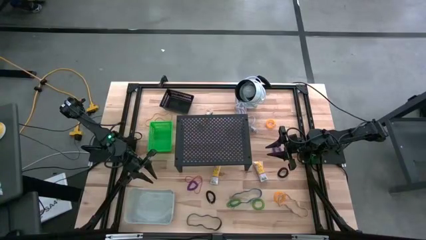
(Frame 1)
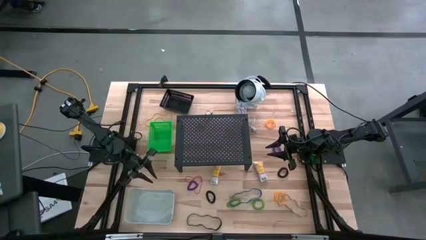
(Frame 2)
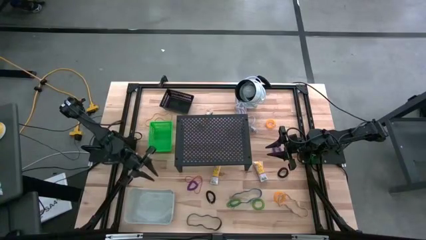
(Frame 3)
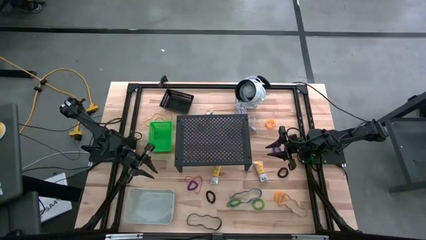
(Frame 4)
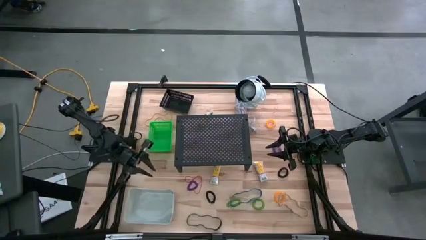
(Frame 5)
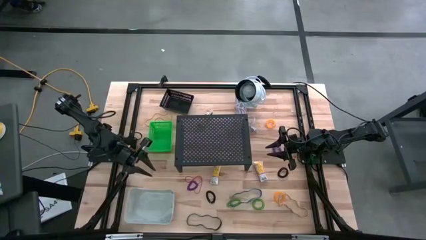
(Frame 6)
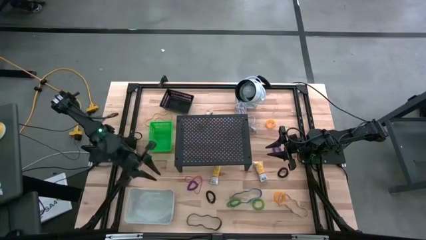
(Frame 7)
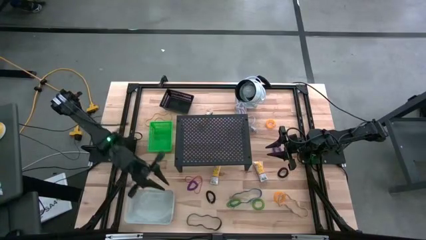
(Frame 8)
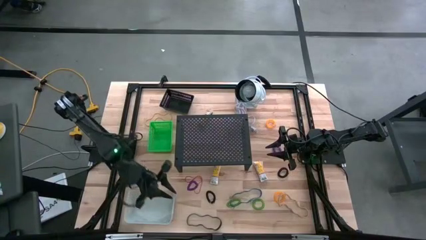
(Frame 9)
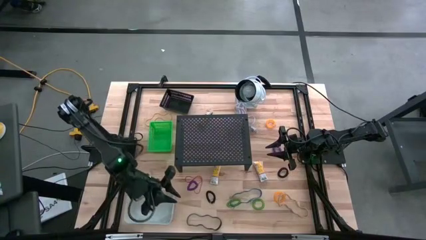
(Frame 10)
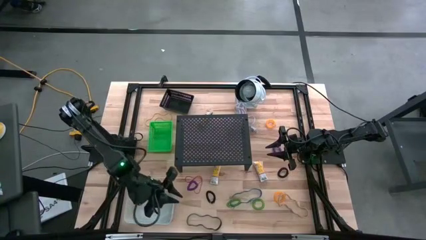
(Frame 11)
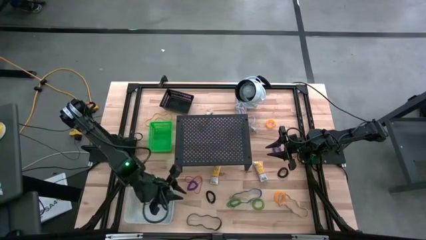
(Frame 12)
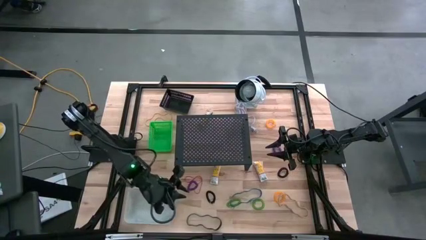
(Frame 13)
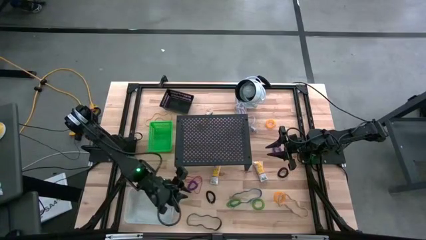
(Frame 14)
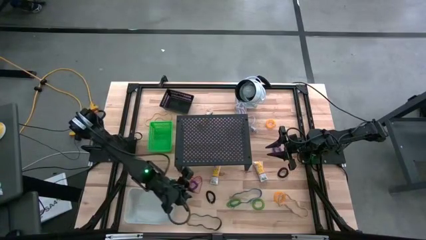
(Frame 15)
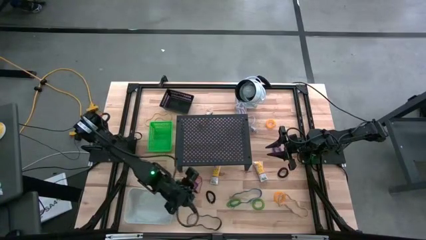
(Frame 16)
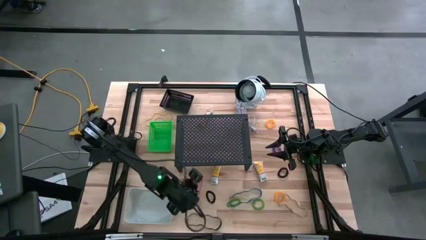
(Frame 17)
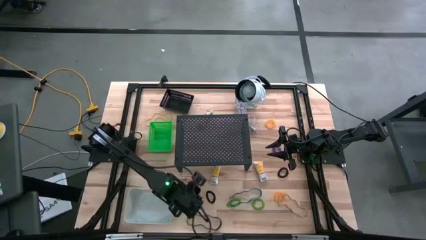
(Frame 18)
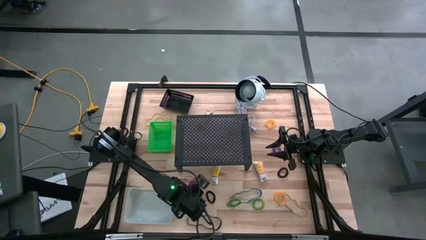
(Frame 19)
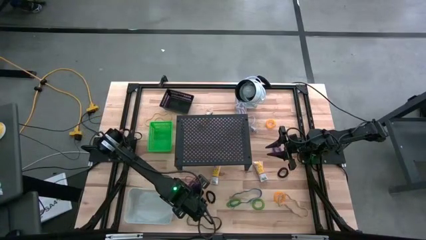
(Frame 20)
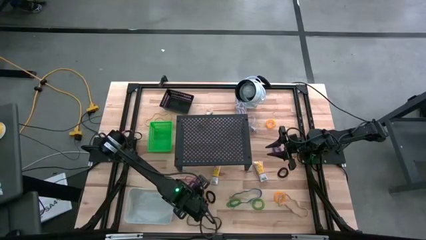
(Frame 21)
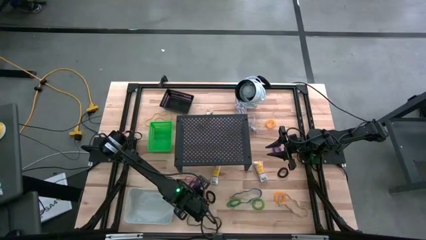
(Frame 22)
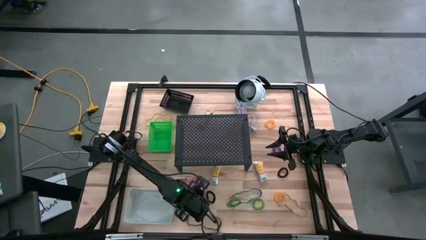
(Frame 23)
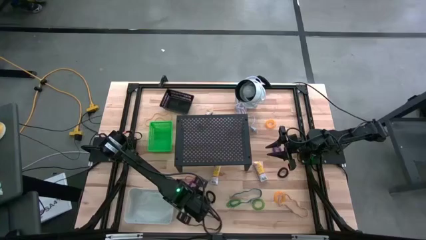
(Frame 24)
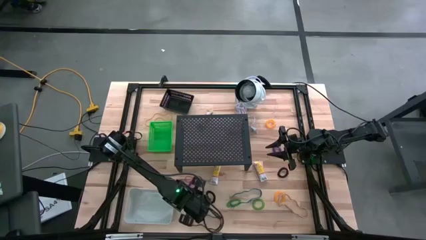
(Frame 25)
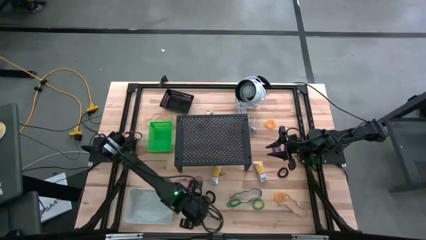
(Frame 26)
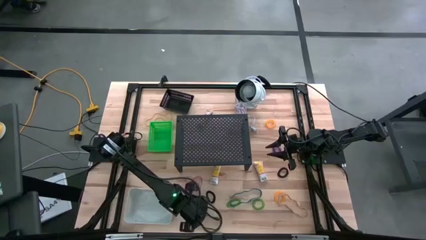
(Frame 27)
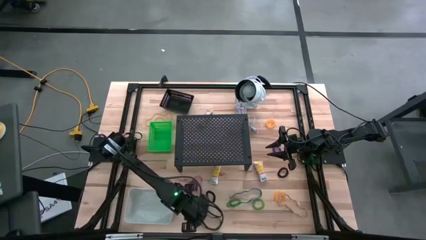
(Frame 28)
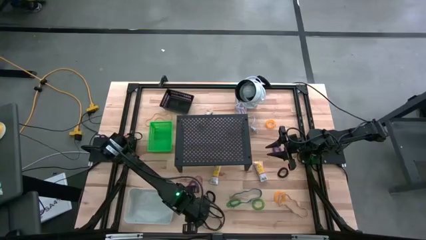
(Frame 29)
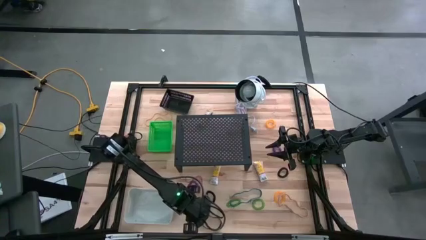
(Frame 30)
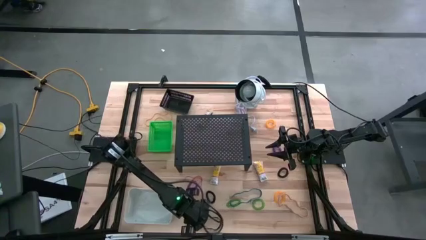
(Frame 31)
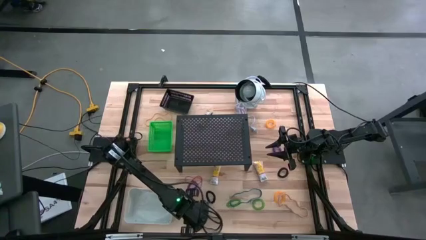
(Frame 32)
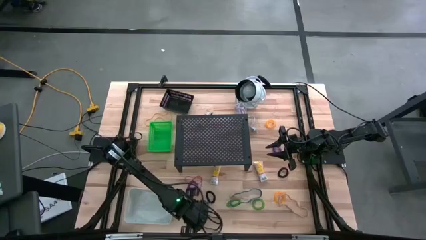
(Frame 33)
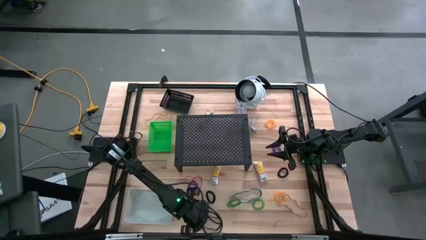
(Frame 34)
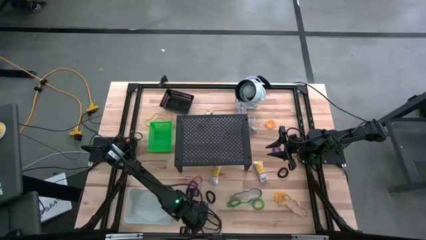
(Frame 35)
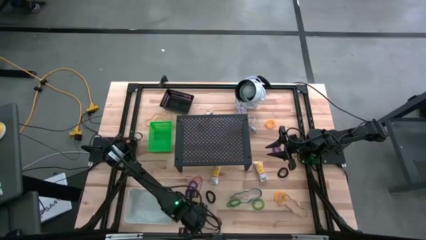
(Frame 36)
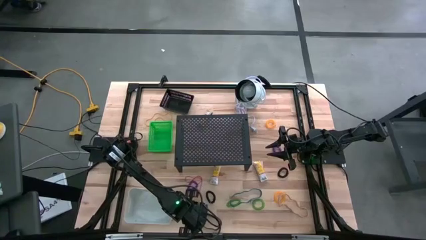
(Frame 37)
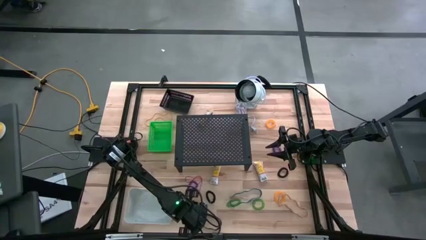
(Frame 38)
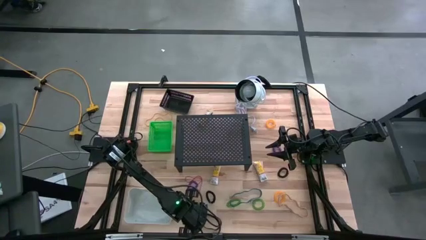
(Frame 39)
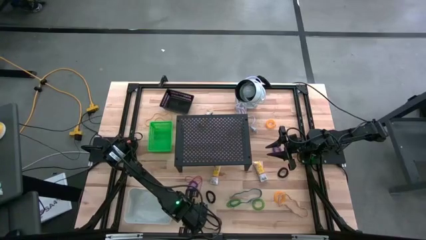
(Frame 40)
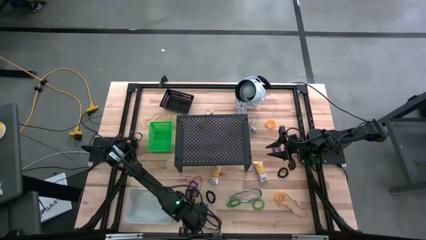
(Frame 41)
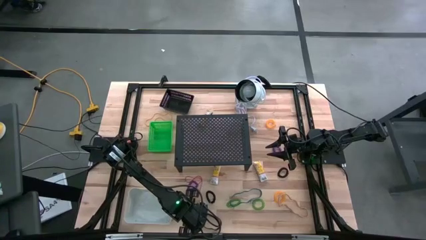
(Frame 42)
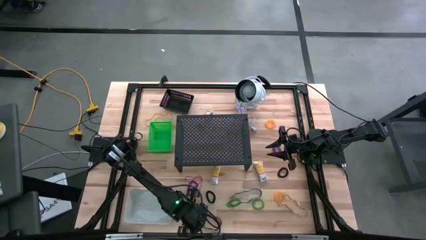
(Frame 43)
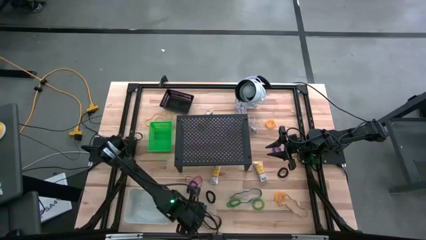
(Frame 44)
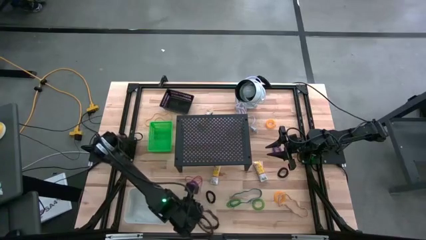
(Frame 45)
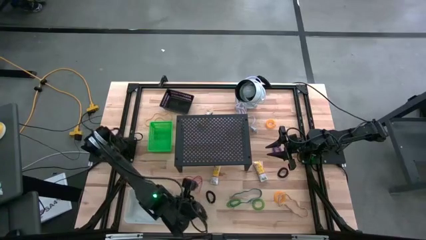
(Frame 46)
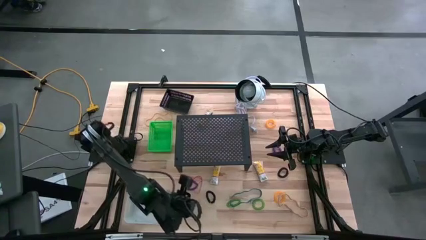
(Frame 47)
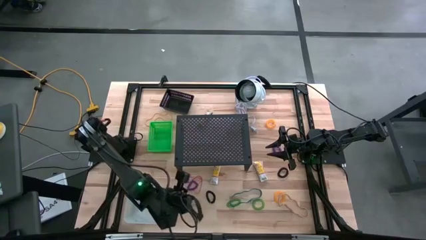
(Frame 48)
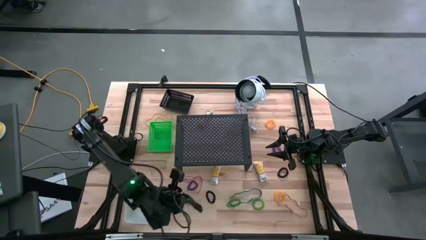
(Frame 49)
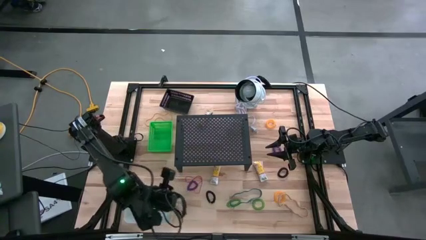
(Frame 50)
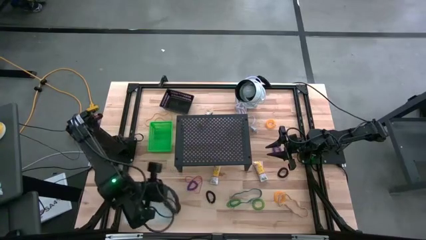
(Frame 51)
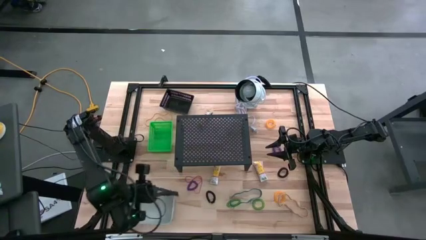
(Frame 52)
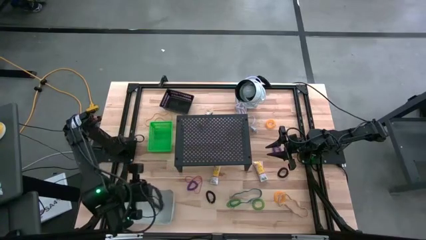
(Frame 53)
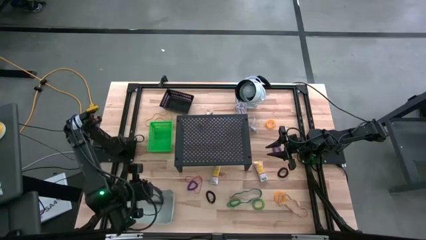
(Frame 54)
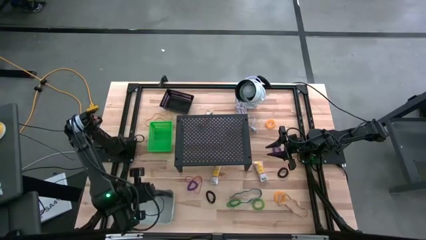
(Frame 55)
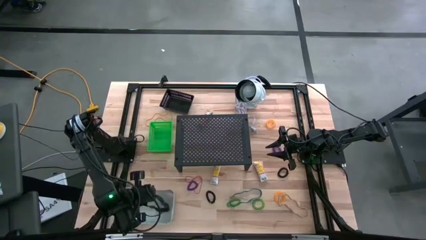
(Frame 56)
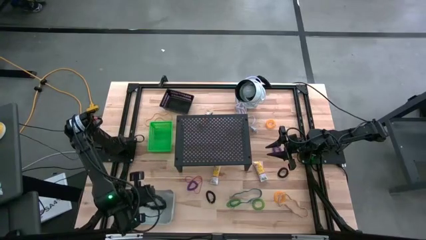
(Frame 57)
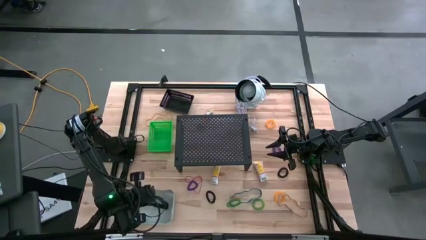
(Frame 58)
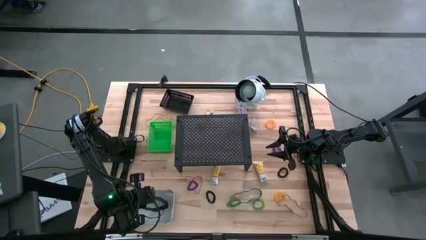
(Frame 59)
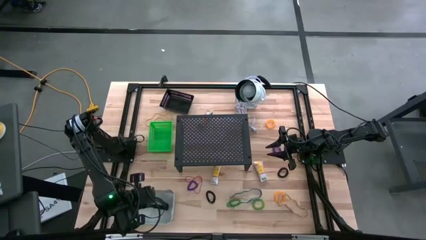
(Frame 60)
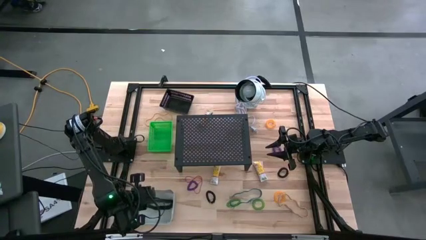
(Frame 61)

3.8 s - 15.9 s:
Task: Pick & Place Office Desk Supplies
Put the black rubber band into the white bin

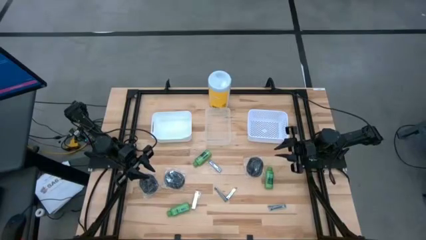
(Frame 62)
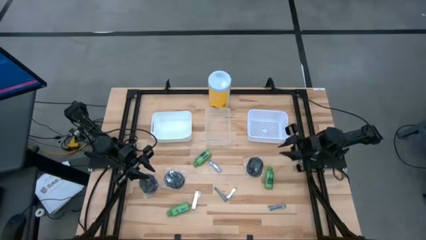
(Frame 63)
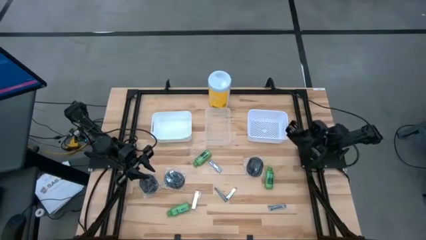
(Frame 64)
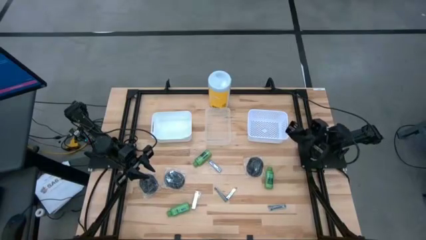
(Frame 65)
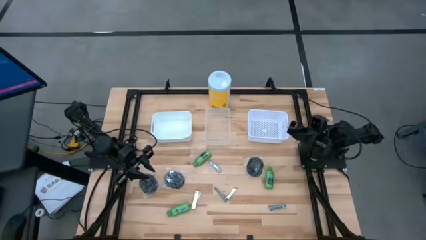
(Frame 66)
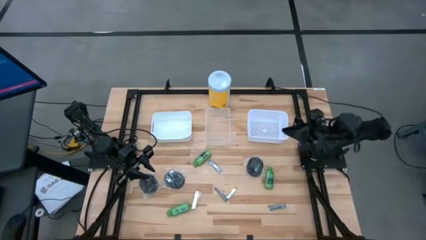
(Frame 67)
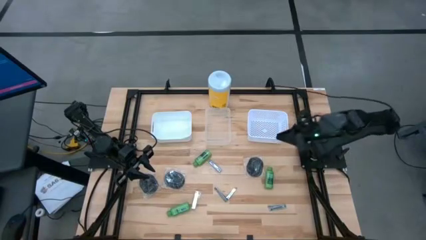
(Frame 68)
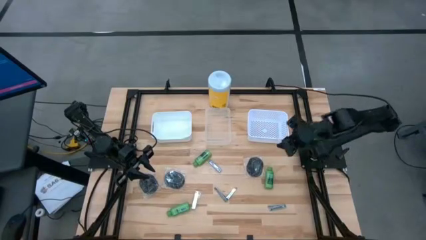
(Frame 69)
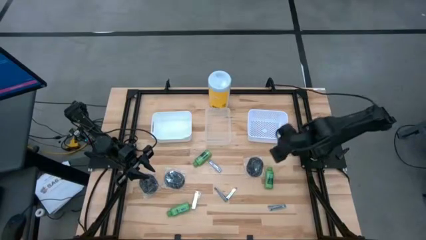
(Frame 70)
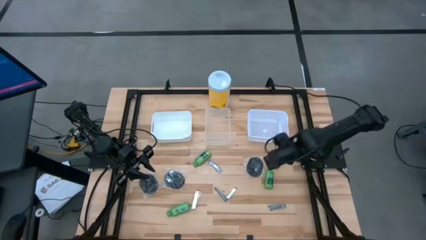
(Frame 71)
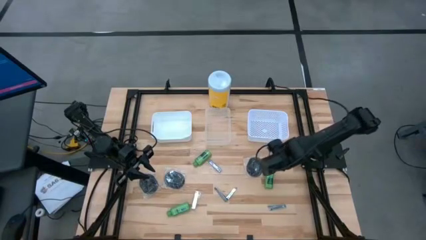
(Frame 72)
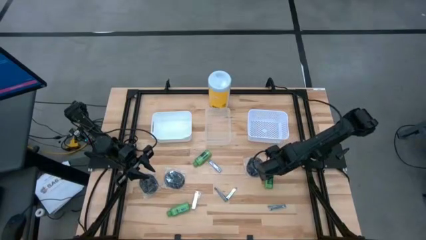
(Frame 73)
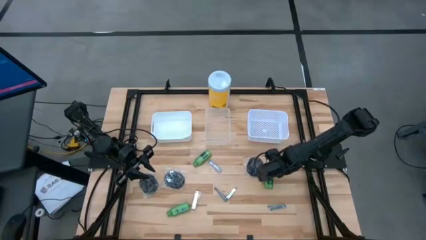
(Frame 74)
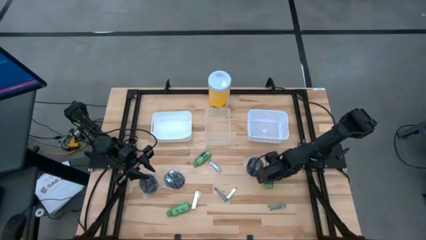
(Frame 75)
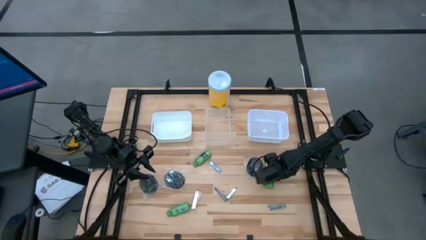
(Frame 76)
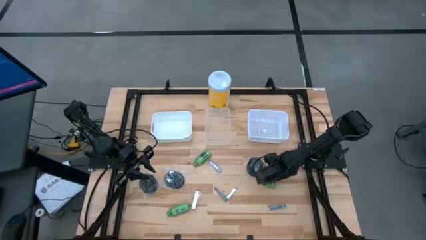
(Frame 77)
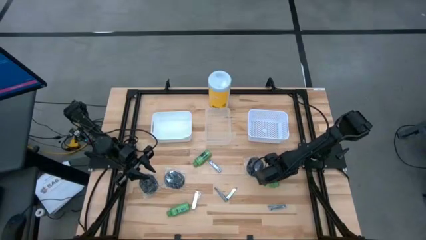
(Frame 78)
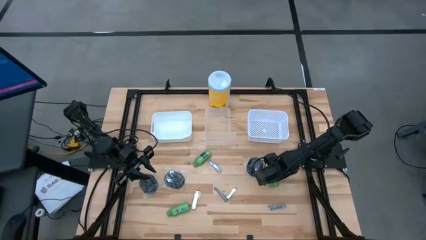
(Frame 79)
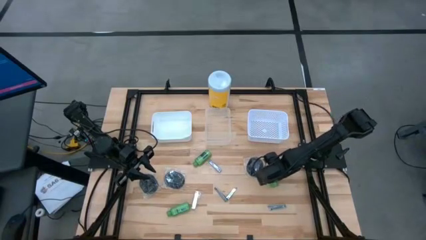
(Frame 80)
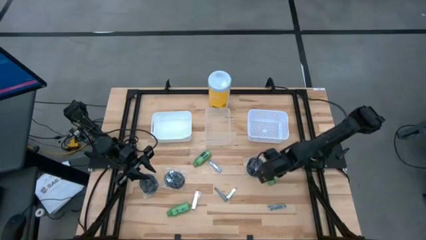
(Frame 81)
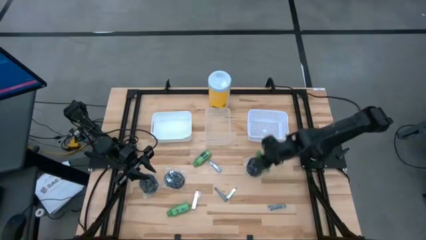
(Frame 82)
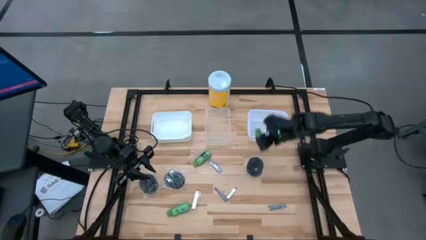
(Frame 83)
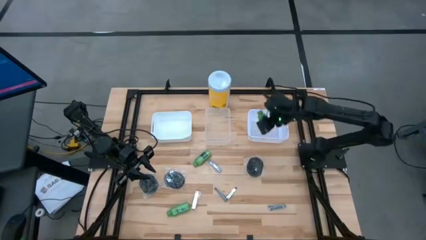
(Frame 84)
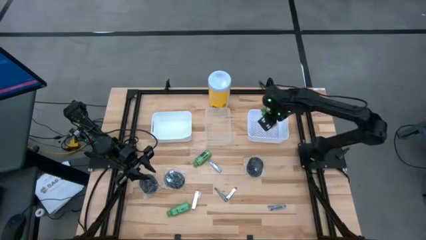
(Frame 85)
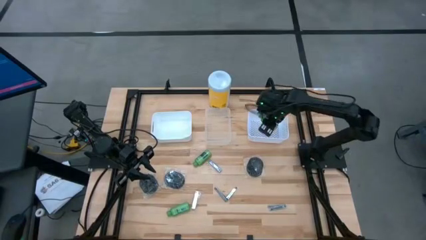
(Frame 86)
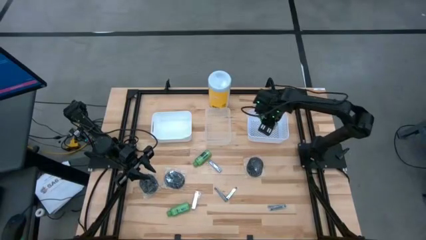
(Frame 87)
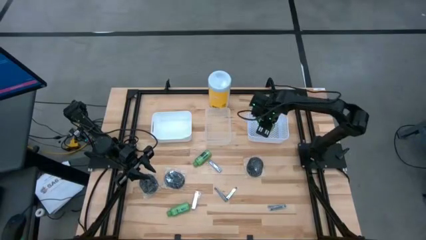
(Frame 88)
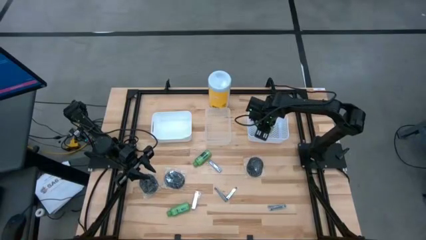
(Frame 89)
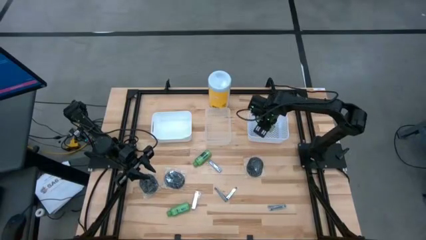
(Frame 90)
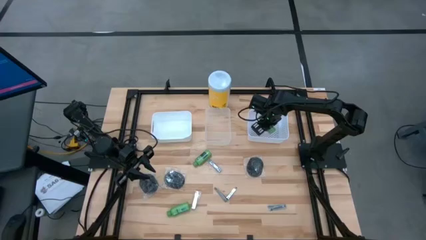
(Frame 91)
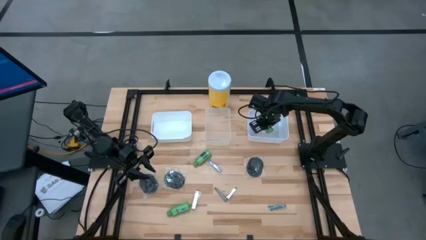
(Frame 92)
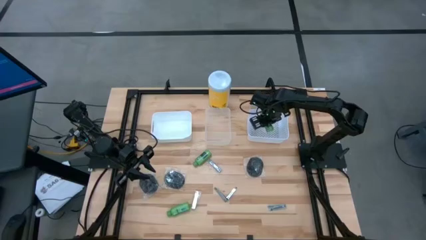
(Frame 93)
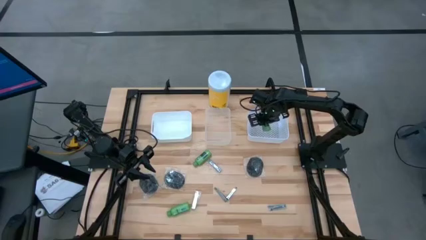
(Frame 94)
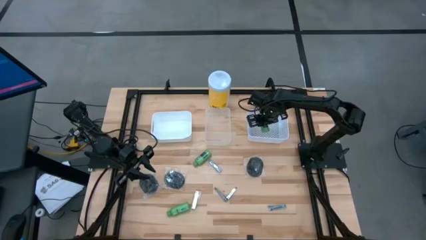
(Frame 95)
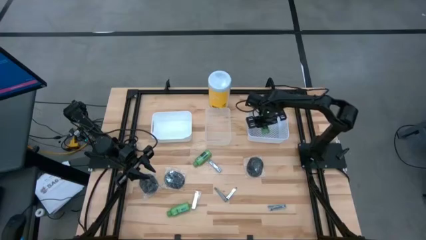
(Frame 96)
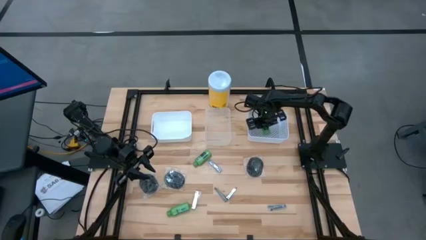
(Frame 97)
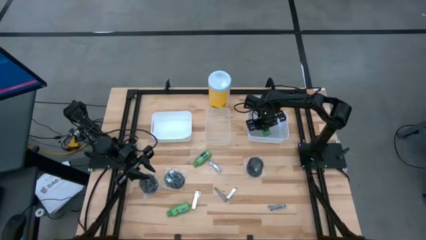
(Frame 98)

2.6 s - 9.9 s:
Task: Pick & Place Travel size toiletries
Put the green shampoo into the right white bin
